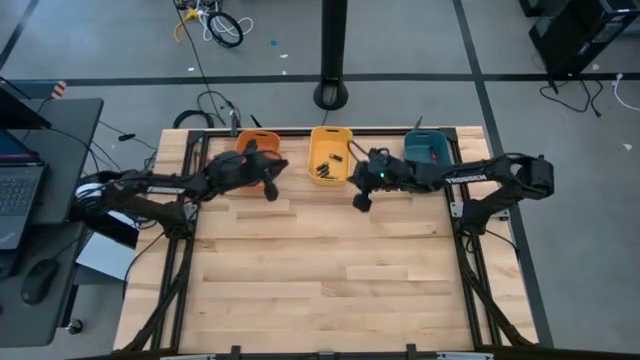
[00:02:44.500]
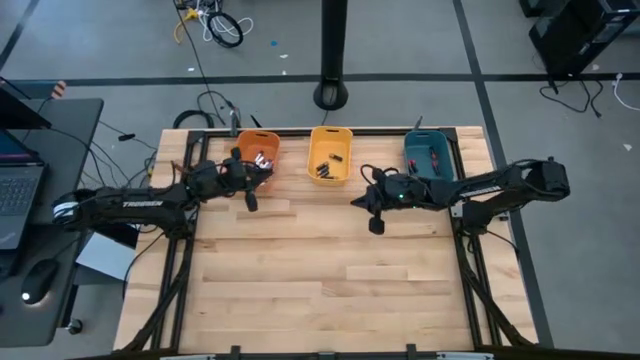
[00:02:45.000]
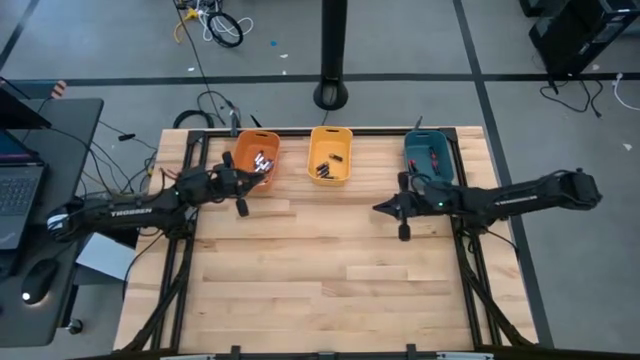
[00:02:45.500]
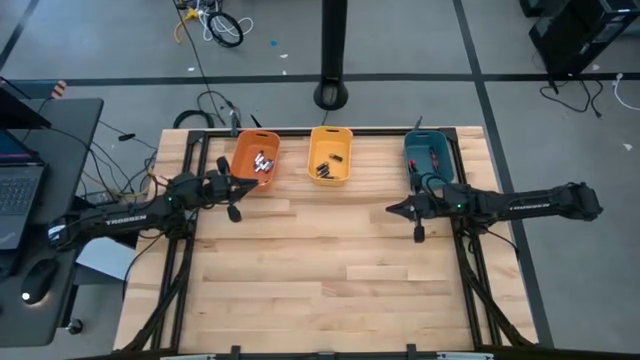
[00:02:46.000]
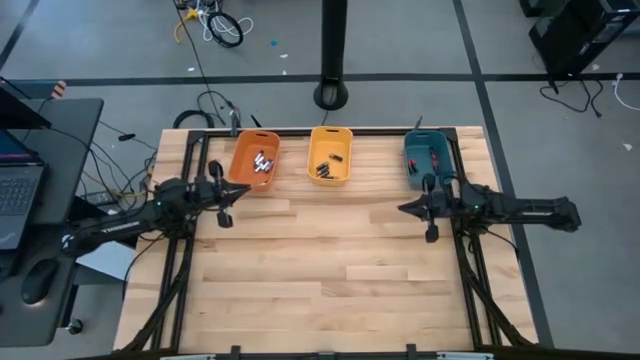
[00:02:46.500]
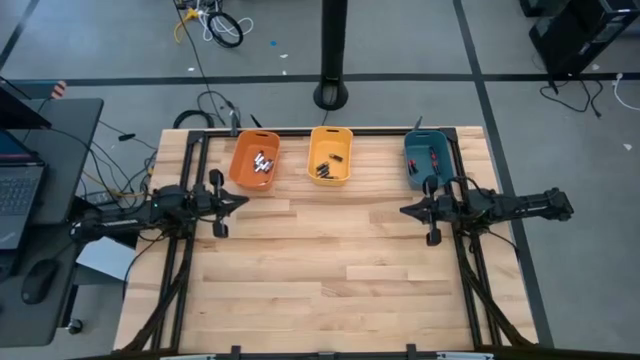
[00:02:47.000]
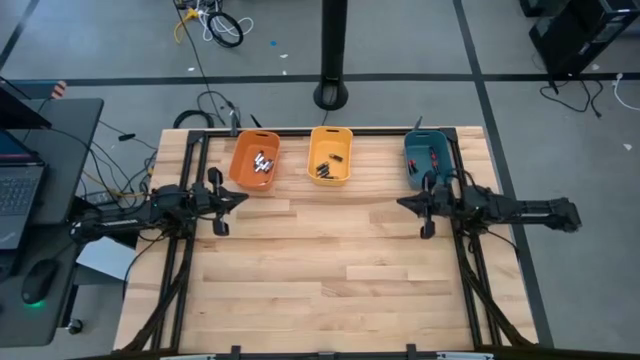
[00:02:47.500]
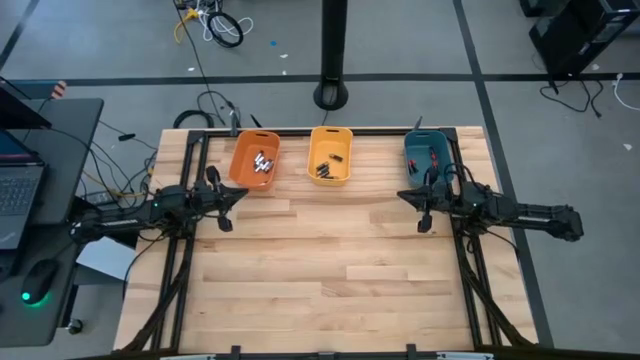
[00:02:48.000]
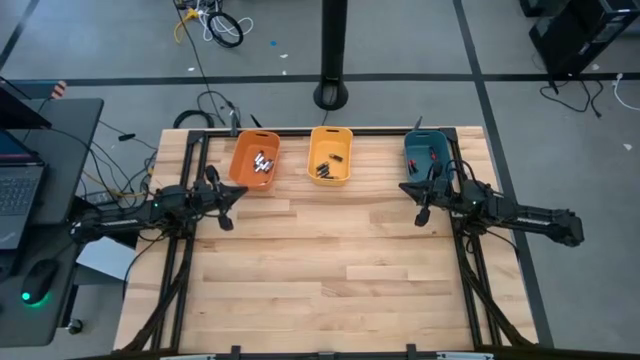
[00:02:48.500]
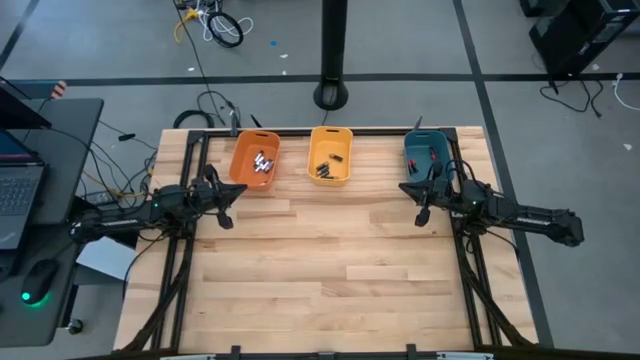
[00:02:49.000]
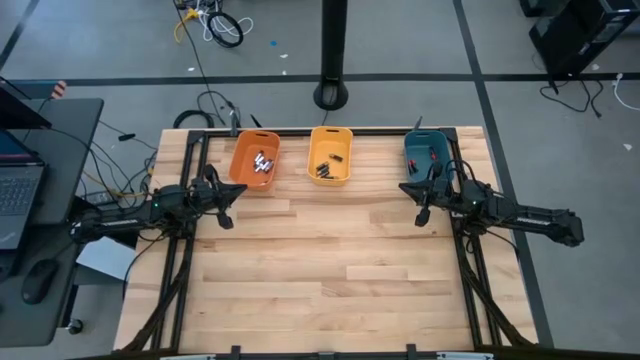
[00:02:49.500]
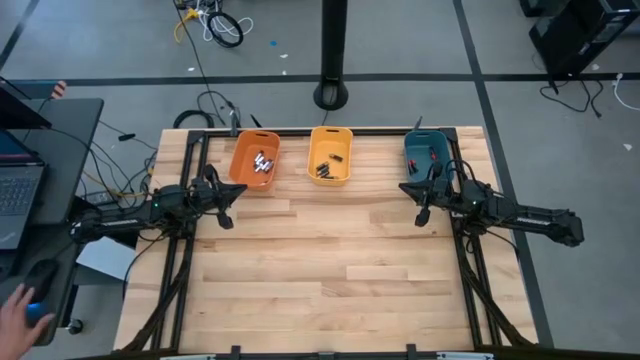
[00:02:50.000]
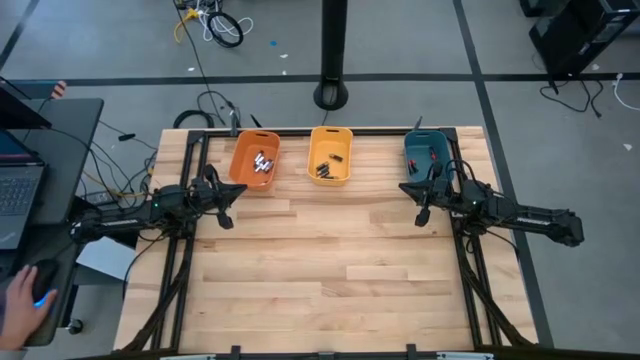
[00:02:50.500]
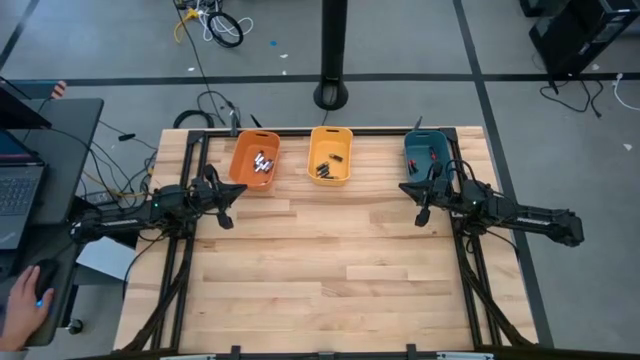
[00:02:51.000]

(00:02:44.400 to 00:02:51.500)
Task: Sort batteries
Return to Home Position

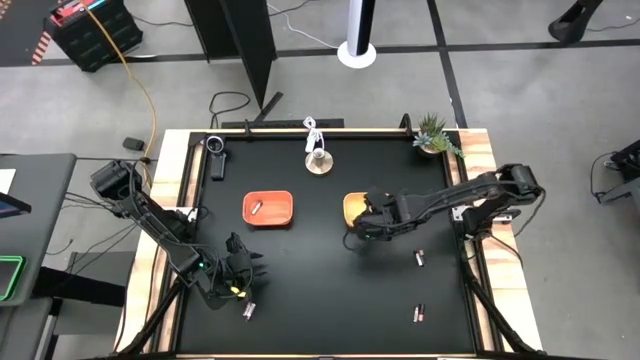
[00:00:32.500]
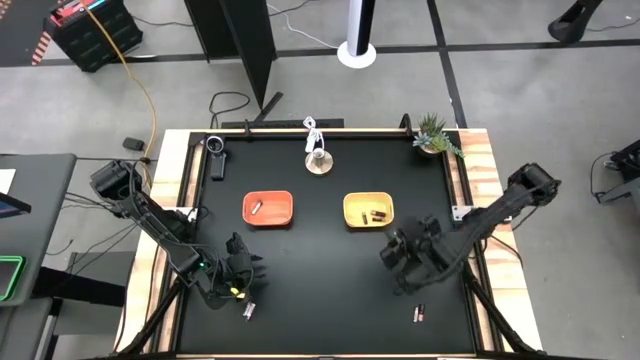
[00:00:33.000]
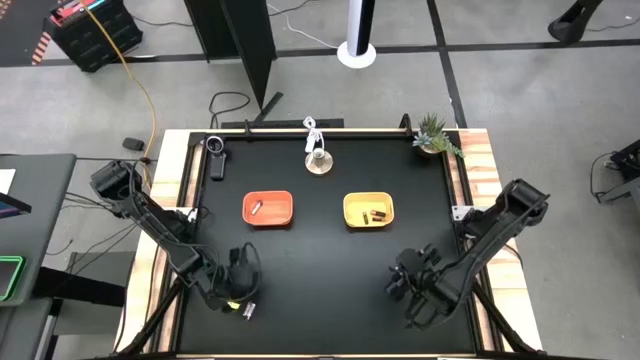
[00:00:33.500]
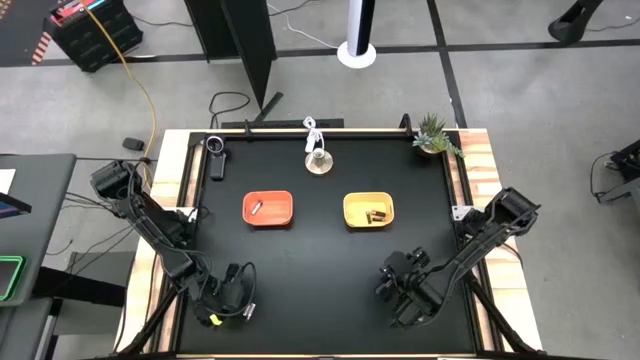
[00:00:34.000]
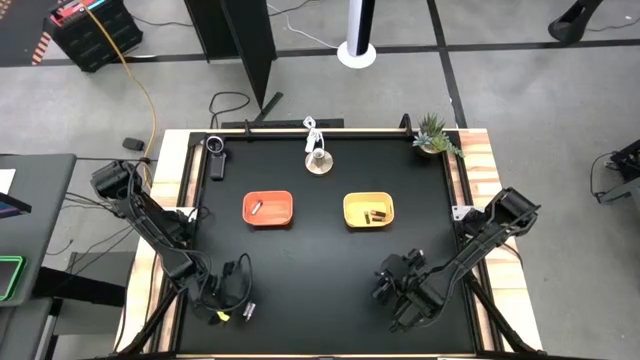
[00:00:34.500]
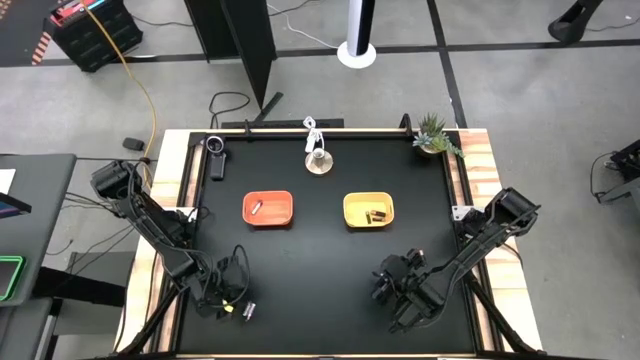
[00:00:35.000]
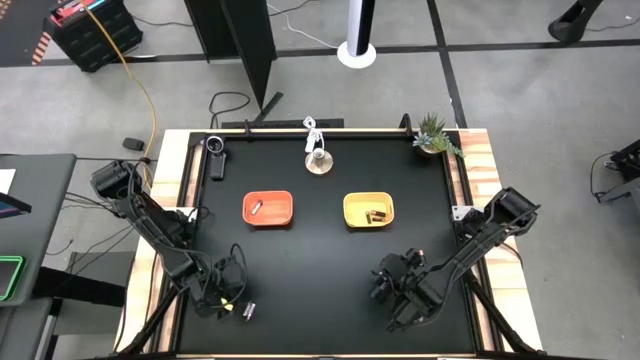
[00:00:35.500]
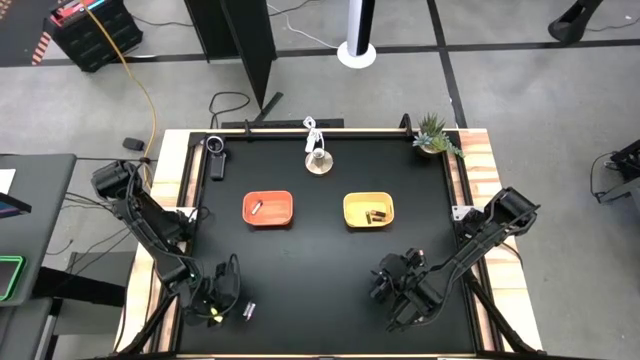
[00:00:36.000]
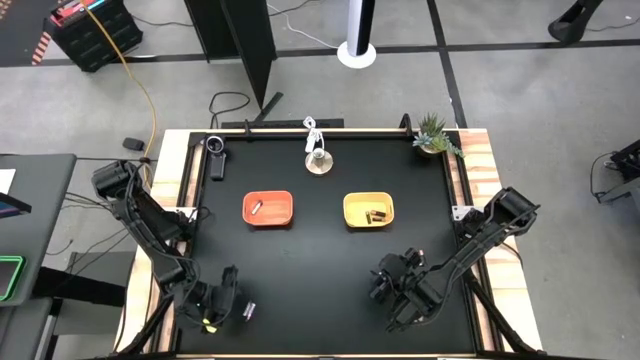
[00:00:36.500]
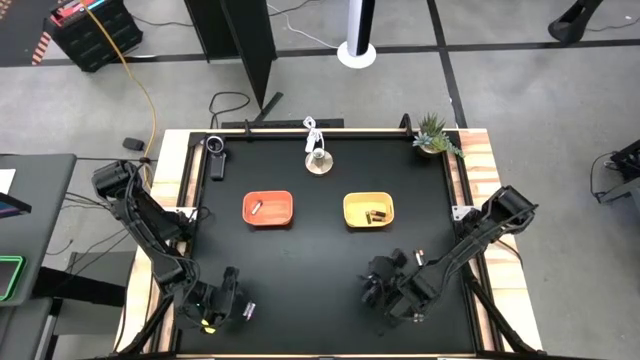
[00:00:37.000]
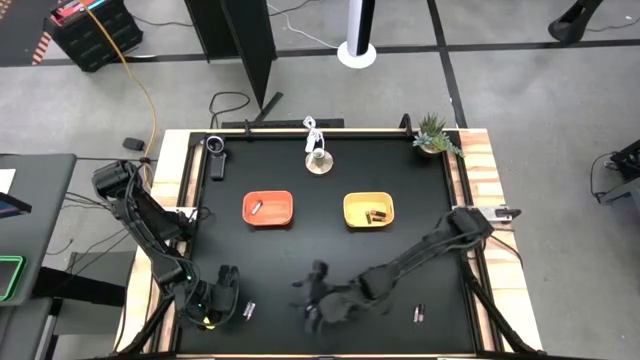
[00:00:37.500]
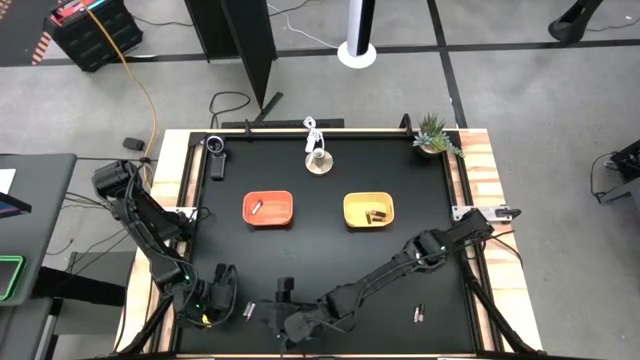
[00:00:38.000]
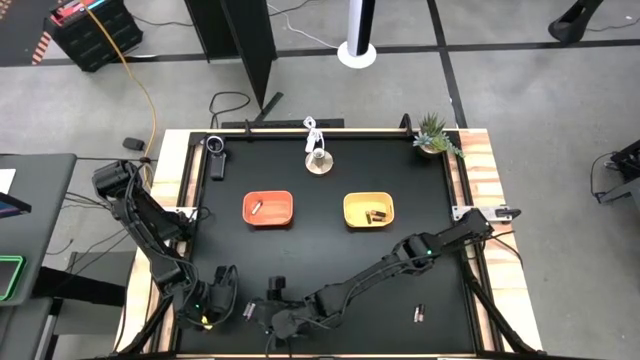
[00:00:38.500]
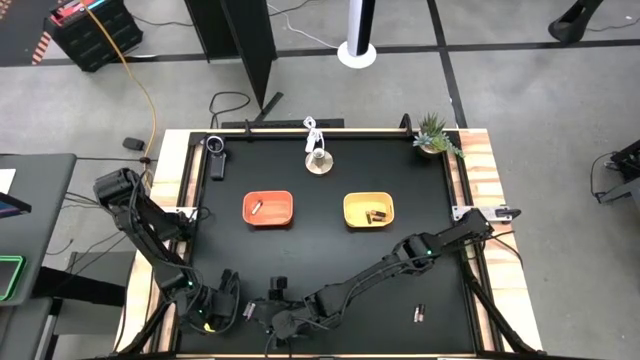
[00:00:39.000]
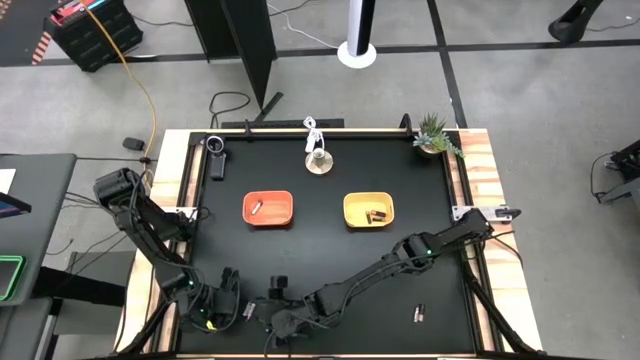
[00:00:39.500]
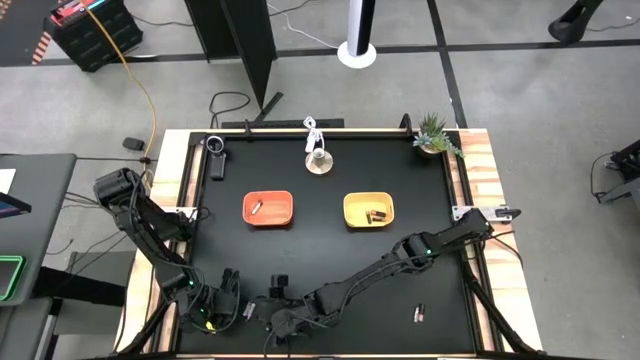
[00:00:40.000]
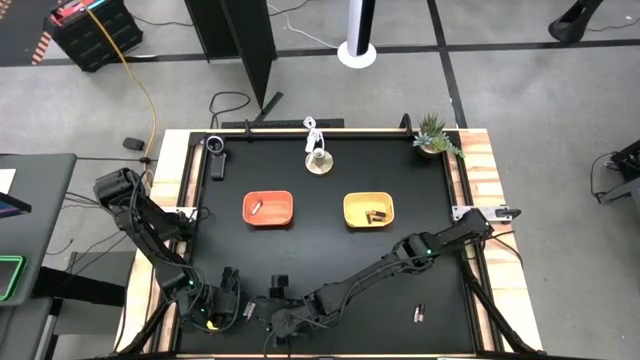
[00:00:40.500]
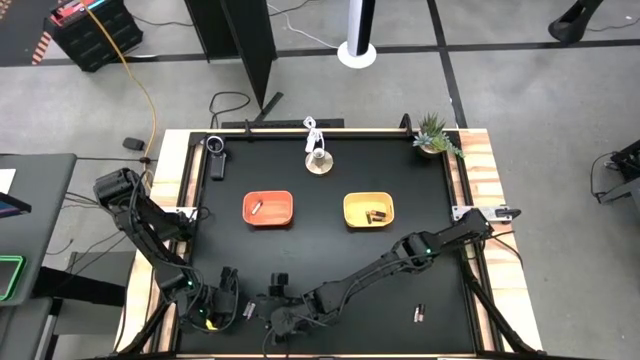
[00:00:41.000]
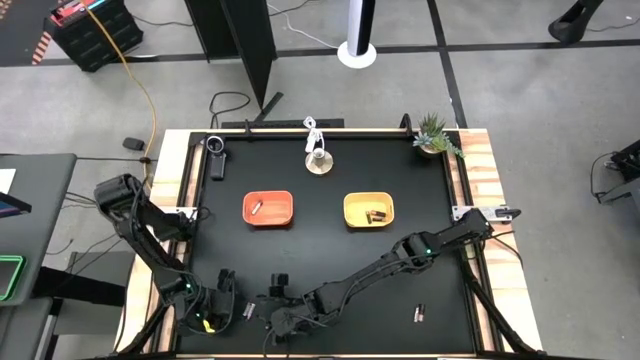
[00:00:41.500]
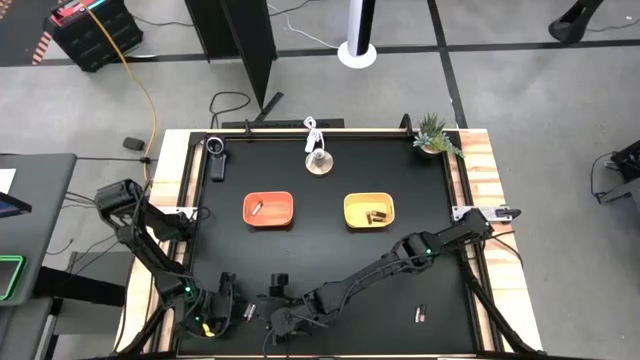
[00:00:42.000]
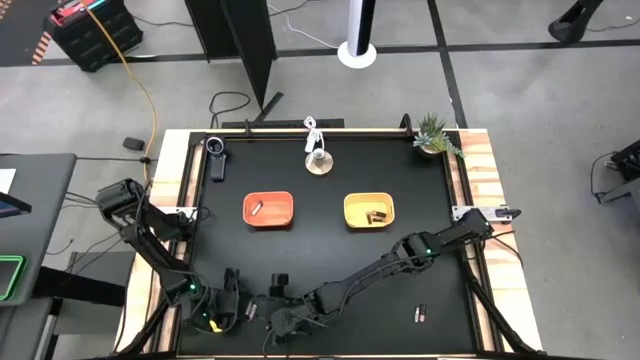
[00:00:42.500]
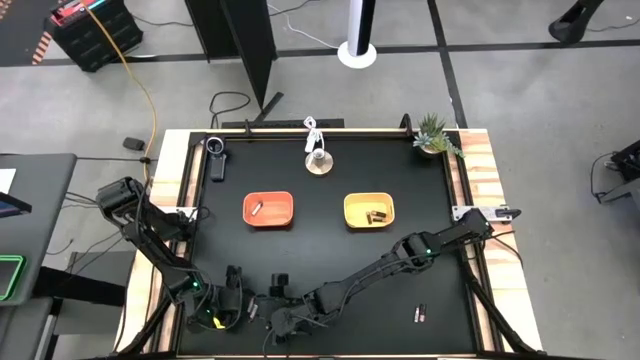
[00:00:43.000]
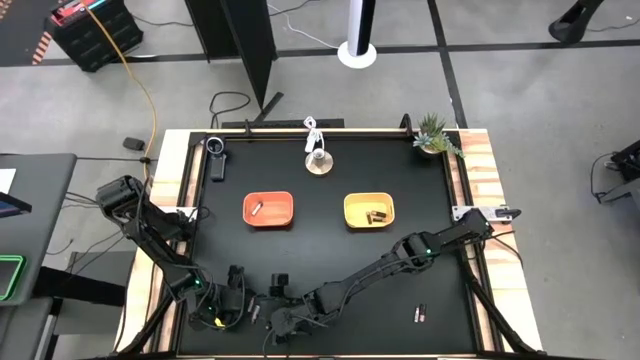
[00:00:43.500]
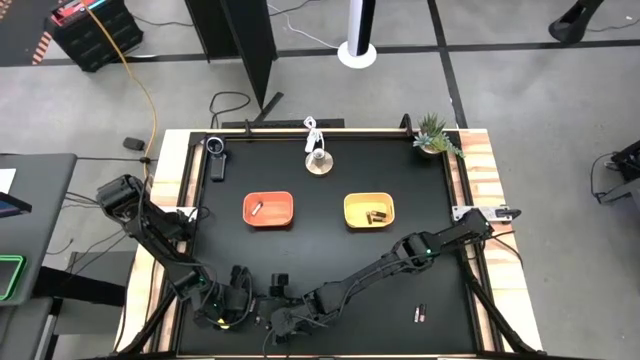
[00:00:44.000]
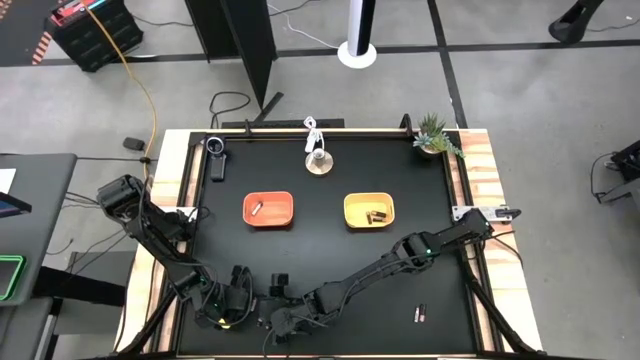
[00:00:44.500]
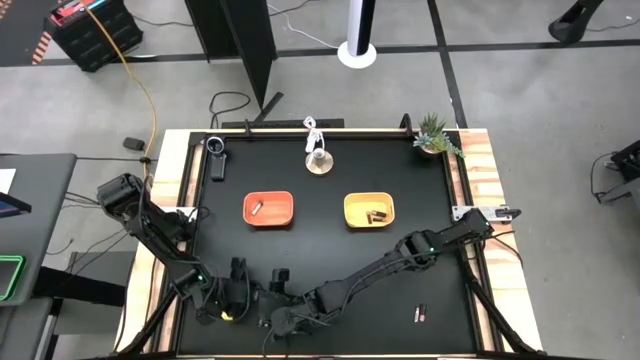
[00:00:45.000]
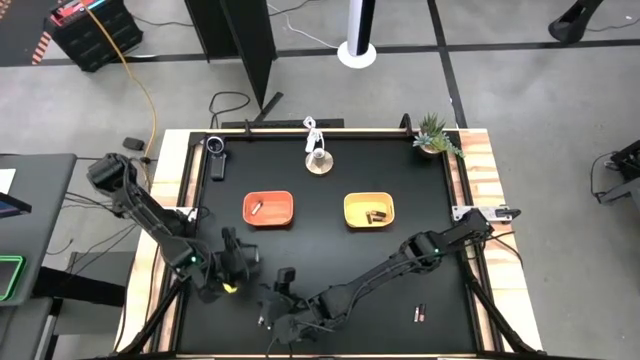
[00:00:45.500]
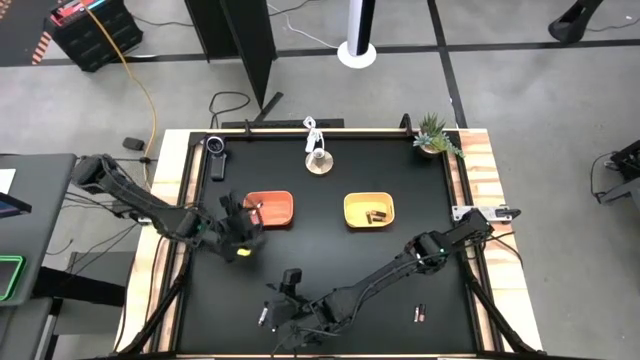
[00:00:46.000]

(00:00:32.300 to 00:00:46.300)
Task: Sort batteries
Put the silver battery into the orange bin
